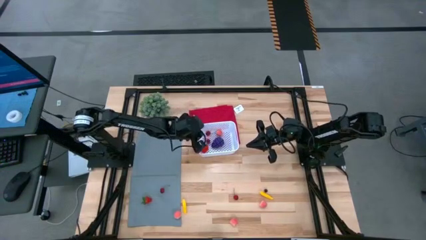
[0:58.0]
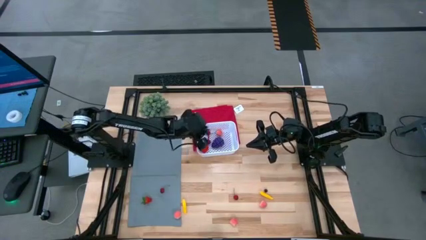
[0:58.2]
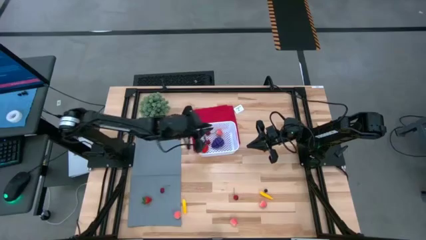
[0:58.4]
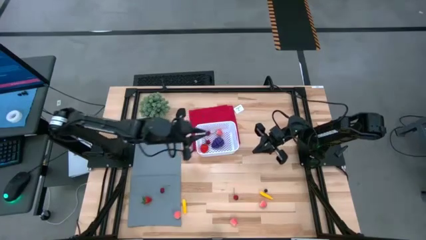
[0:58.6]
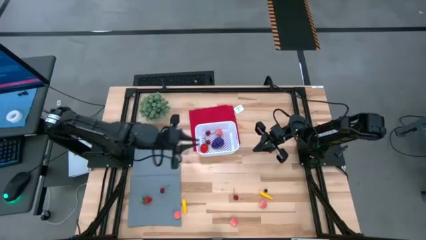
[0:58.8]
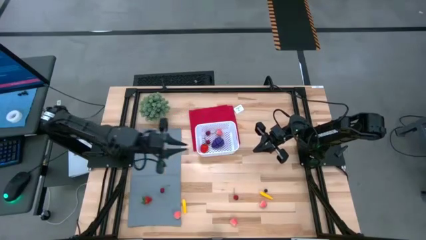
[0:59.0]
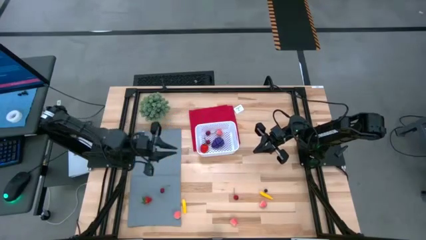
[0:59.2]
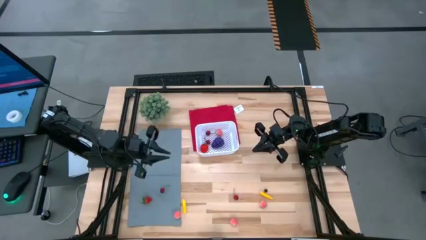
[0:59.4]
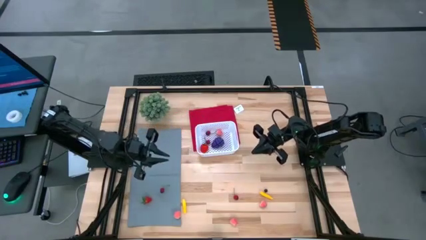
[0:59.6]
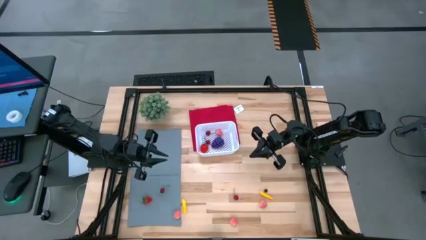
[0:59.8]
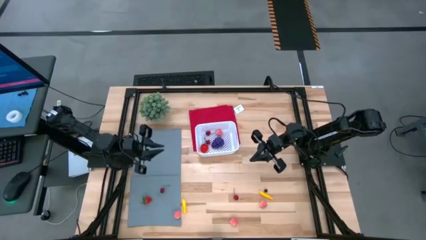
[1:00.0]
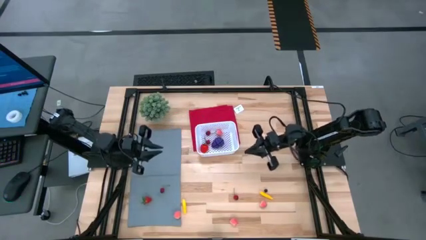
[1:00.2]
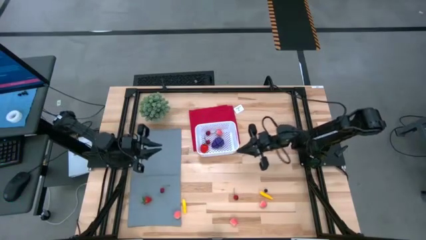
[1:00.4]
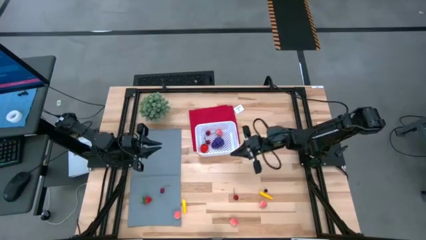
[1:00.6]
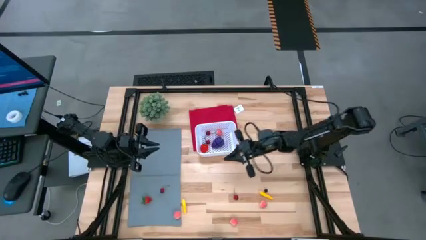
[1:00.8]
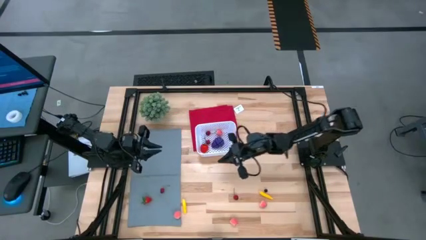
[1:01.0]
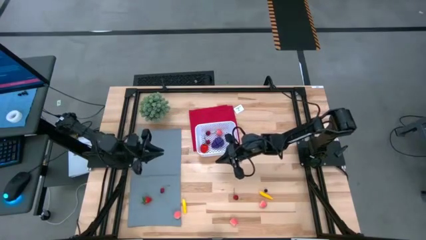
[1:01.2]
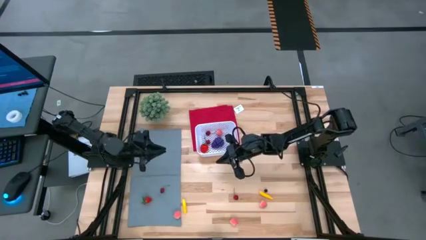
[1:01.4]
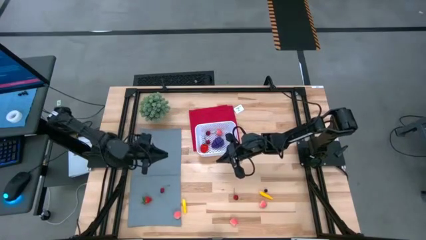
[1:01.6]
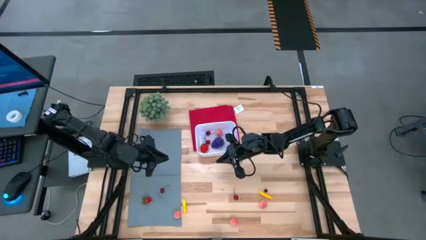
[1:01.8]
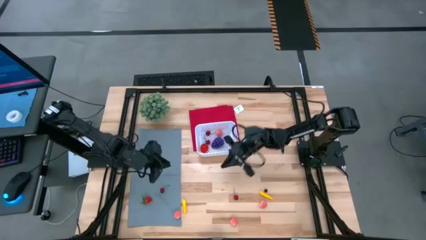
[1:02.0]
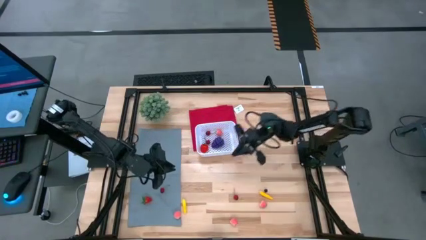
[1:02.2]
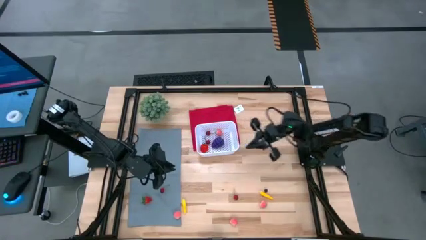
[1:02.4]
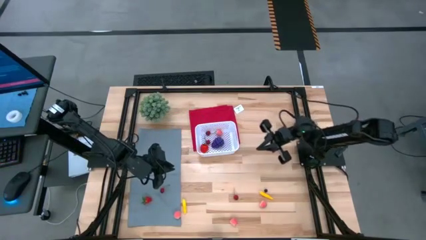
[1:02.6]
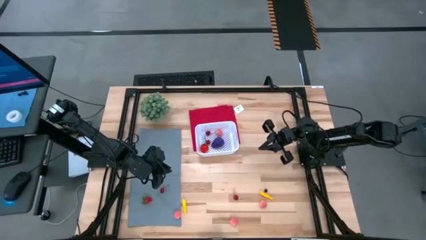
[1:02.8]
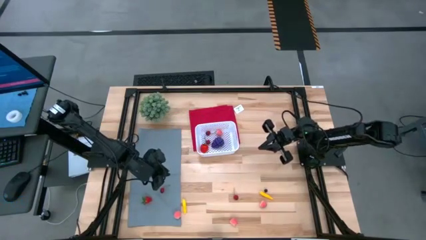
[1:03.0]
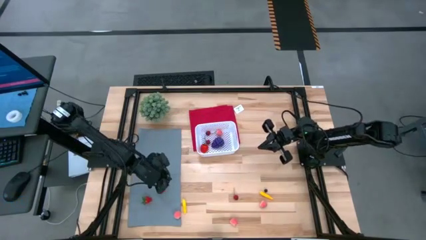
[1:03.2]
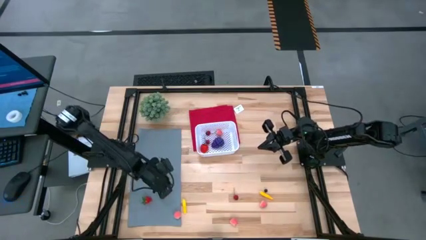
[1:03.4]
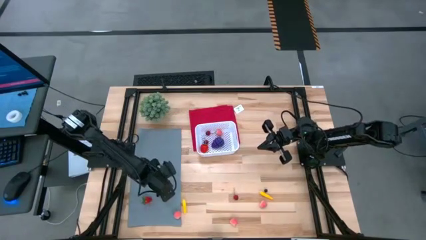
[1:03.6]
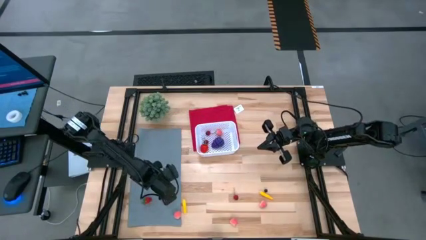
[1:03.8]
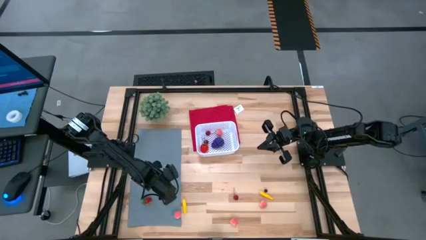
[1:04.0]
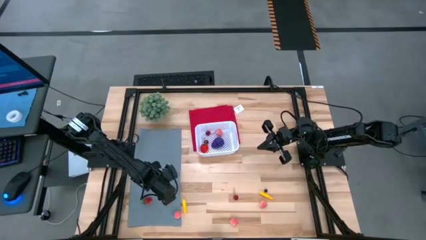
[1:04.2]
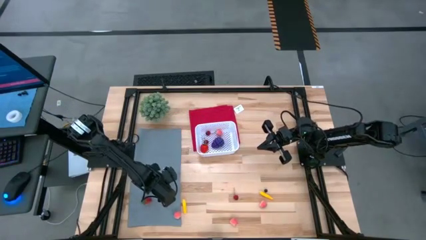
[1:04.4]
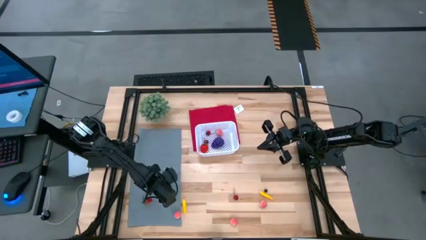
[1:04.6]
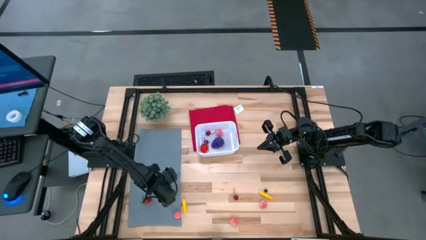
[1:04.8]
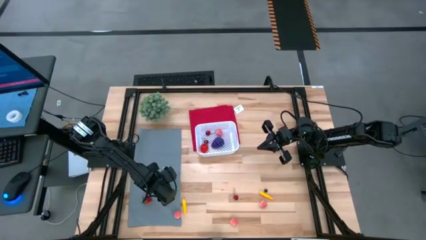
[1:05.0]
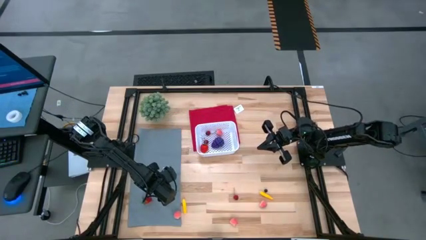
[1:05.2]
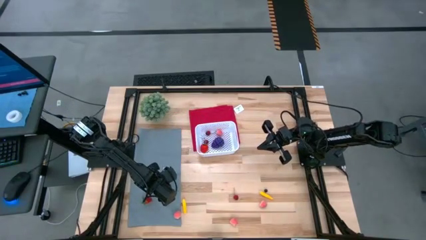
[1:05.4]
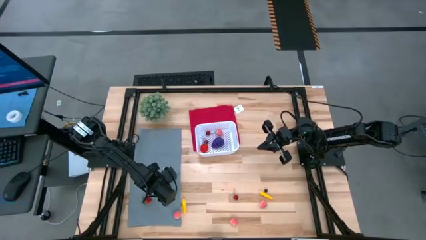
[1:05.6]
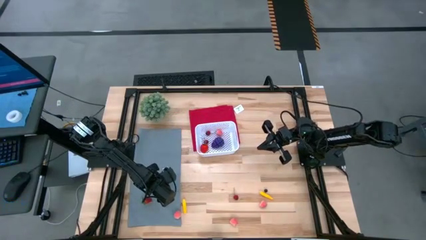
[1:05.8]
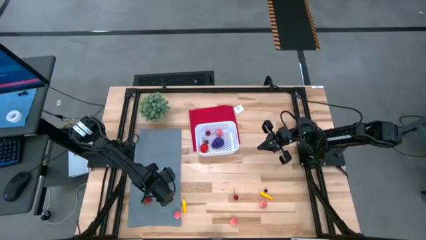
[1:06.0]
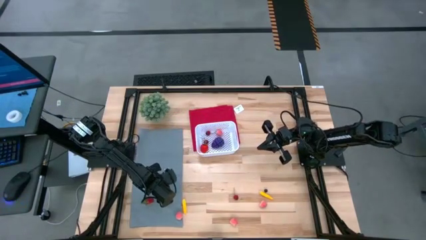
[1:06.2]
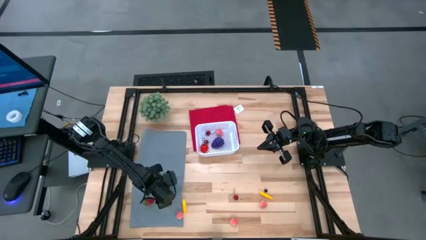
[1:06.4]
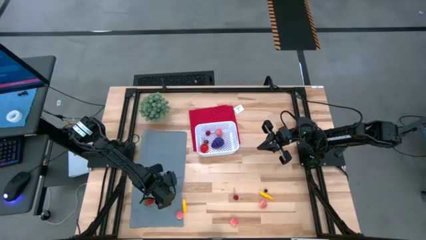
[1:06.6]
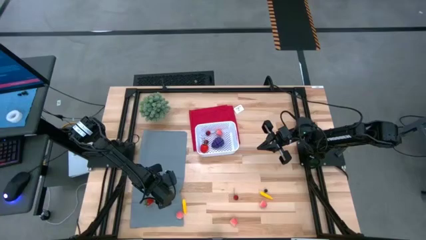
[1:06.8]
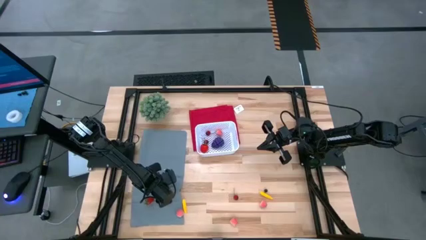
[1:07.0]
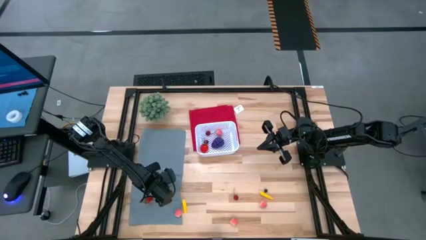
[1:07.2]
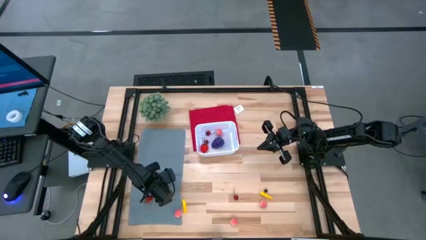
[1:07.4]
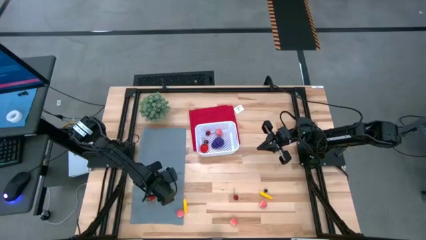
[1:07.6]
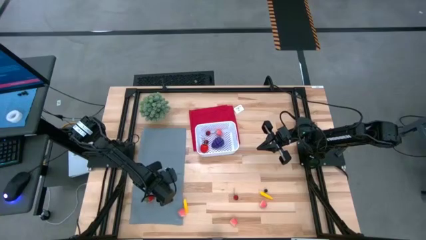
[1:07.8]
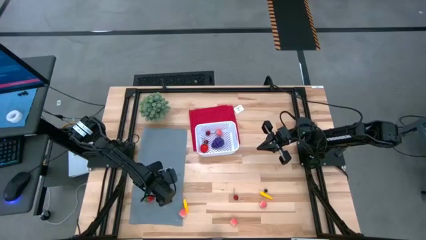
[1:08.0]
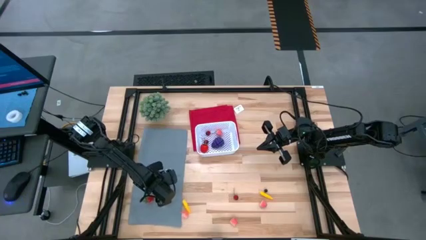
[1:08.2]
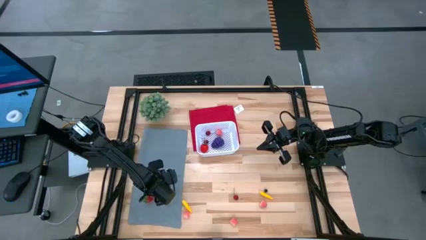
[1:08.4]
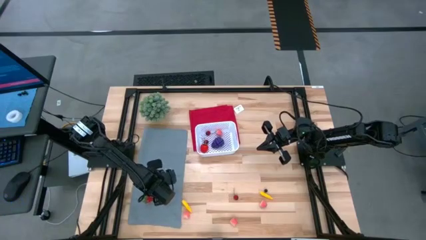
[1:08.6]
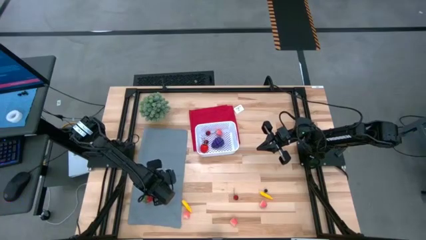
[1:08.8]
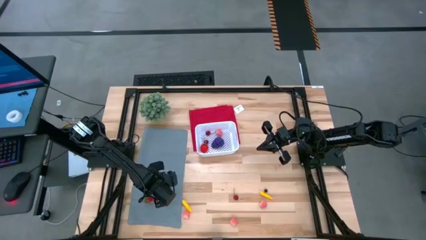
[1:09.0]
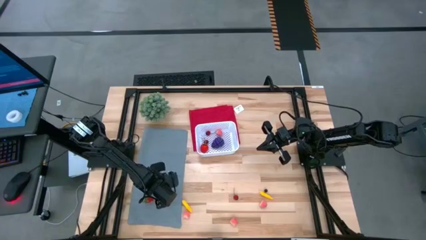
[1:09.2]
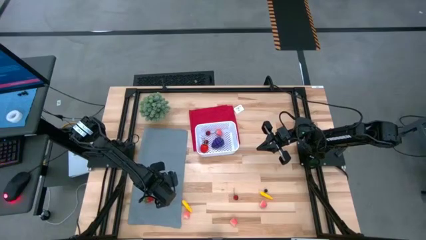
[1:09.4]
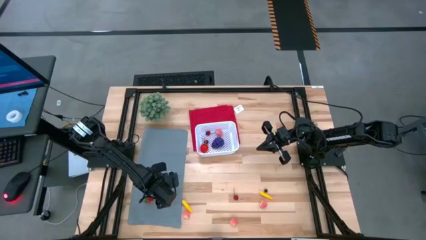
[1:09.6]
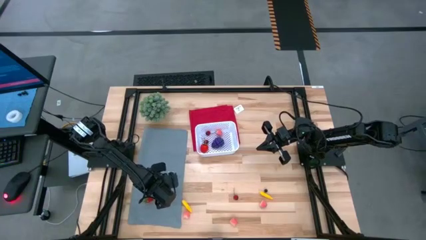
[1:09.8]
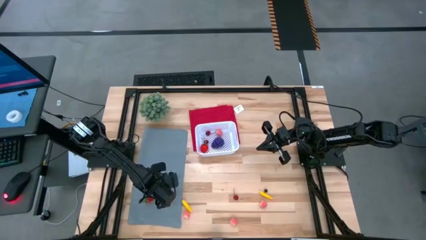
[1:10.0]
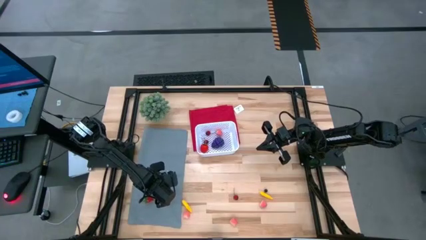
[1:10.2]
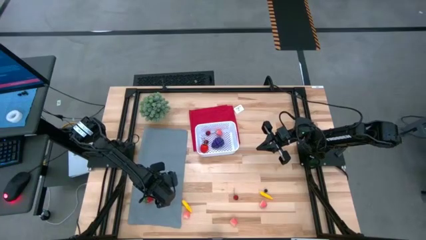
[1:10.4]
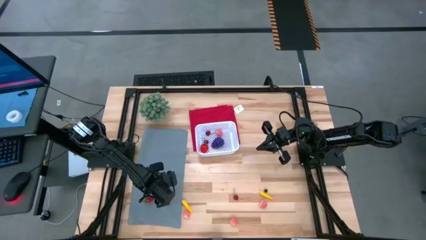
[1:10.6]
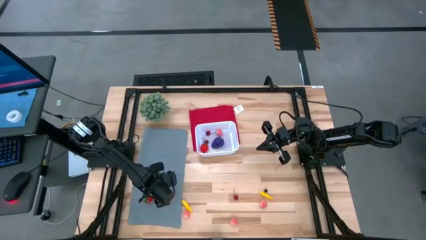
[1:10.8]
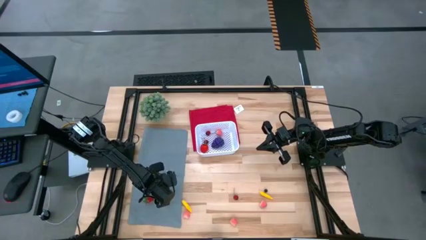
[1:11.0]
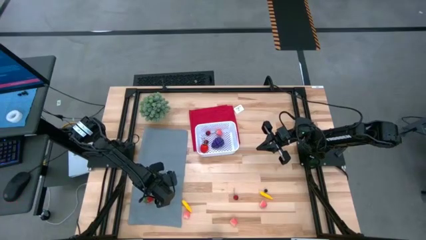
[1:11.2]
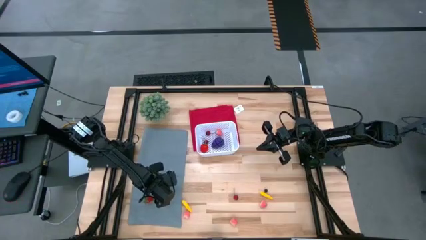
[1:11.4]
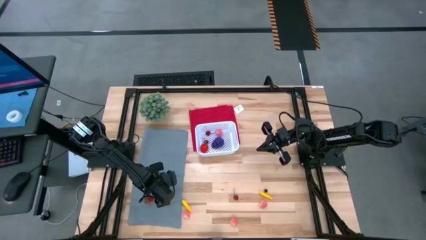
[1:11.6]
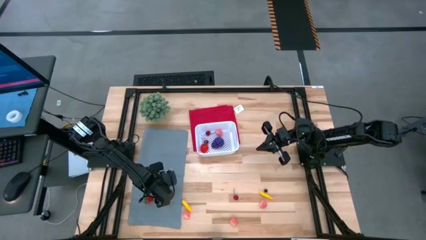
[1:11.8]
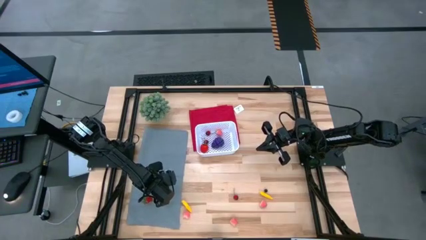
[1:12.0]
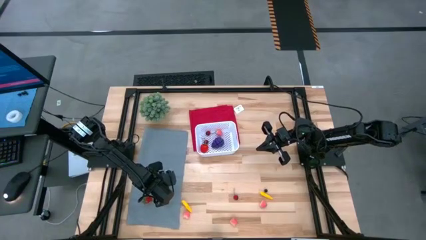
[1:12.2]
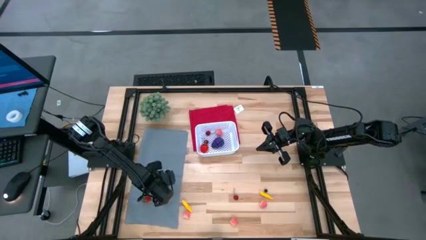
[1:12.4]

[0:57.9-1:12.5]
Task: Pick and placing Produce into tupperware
Put the red cherry into the white bin
